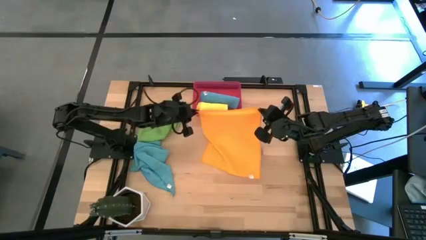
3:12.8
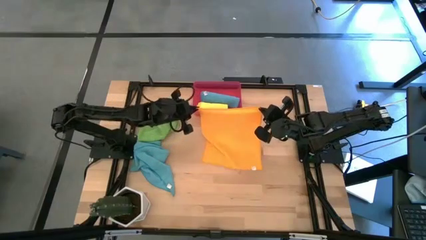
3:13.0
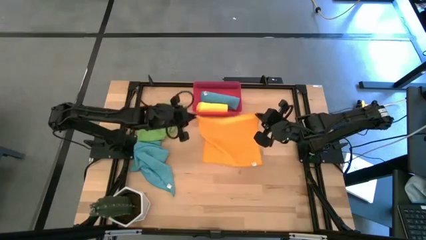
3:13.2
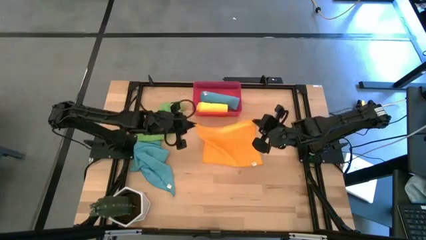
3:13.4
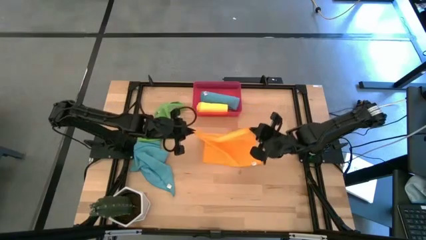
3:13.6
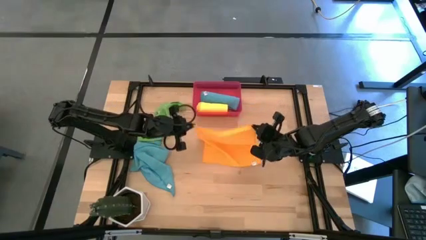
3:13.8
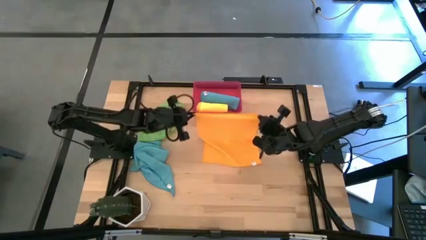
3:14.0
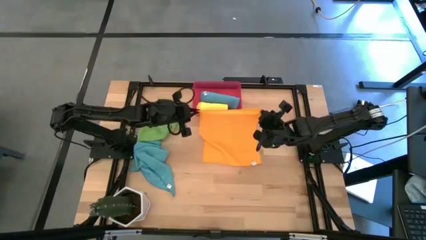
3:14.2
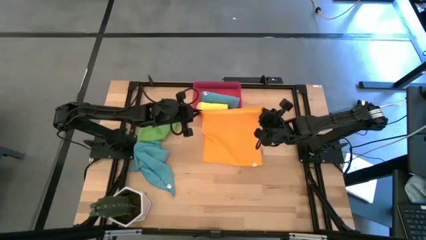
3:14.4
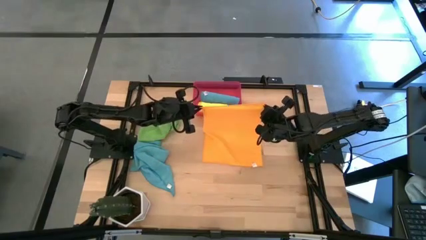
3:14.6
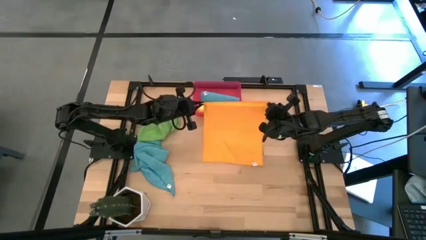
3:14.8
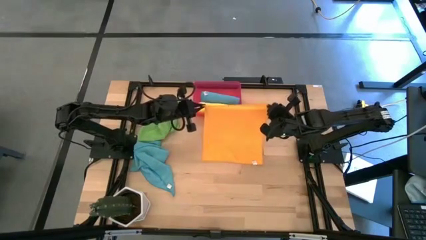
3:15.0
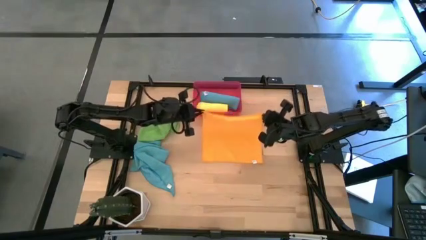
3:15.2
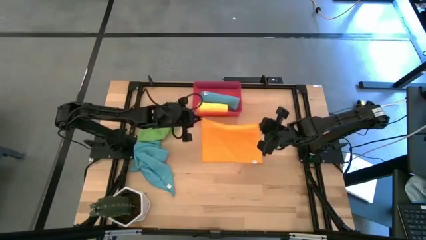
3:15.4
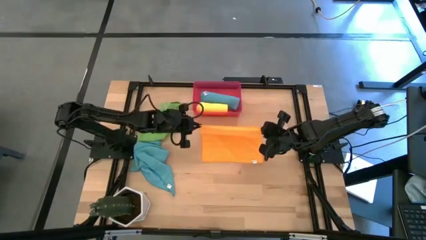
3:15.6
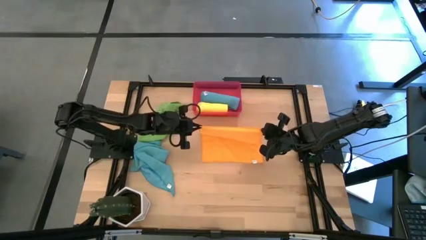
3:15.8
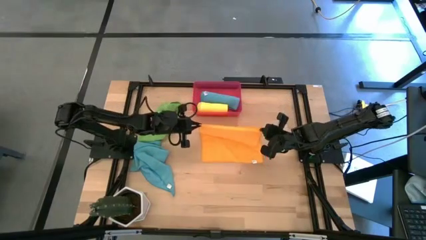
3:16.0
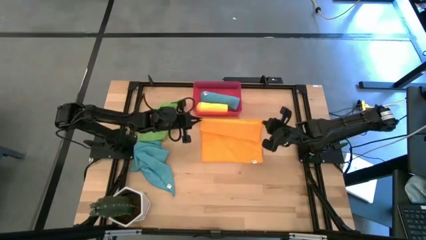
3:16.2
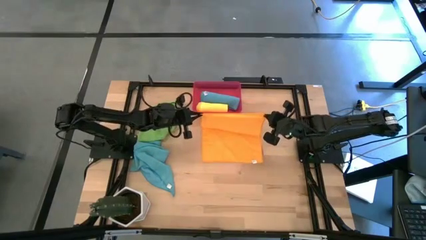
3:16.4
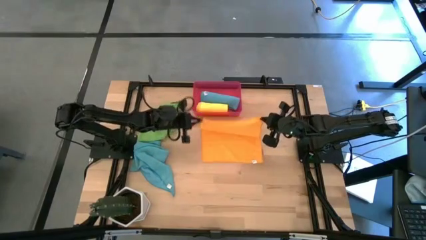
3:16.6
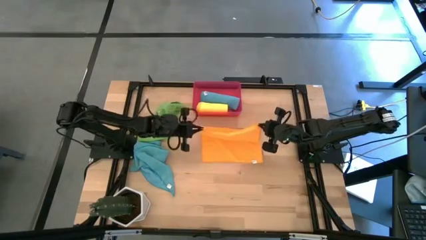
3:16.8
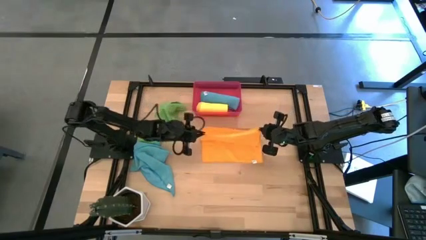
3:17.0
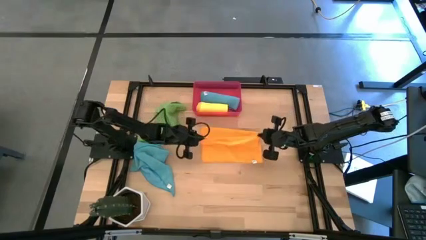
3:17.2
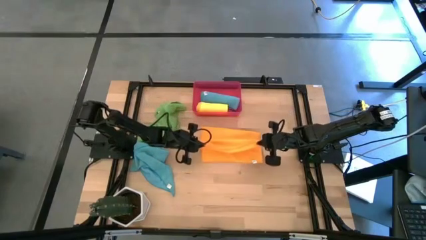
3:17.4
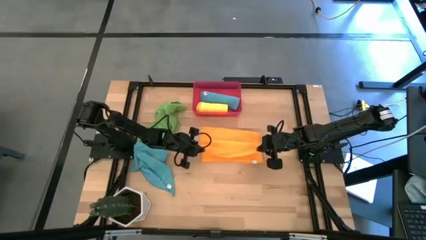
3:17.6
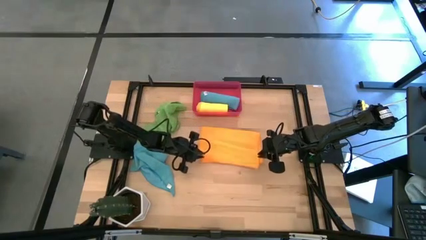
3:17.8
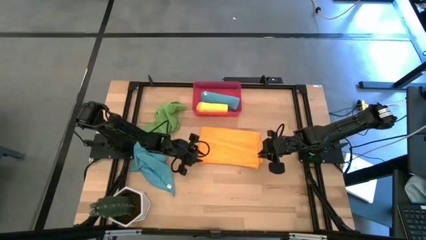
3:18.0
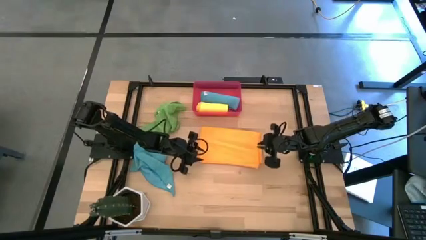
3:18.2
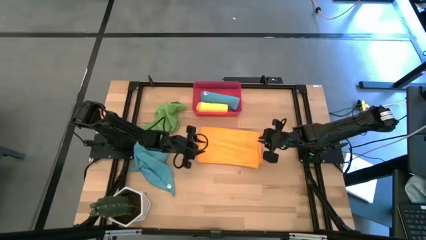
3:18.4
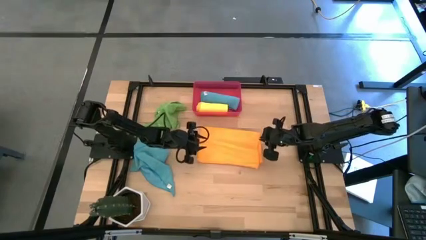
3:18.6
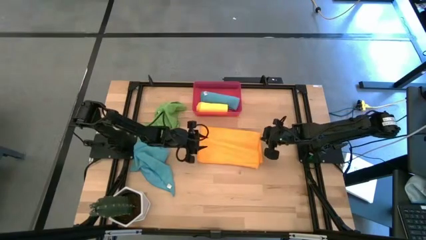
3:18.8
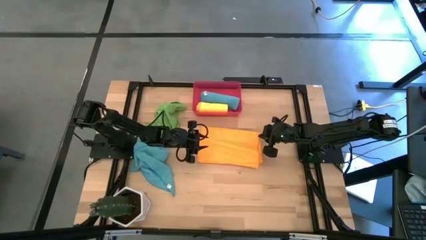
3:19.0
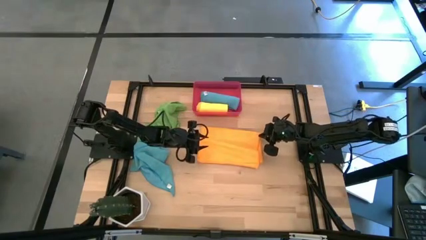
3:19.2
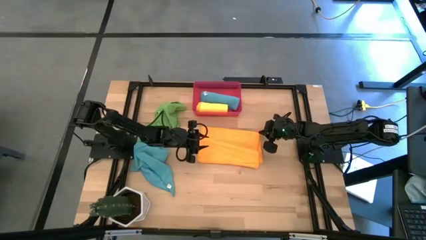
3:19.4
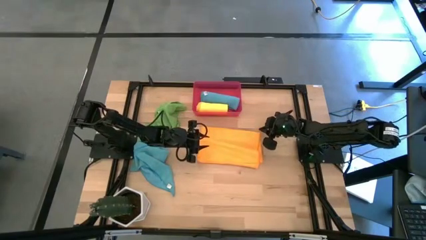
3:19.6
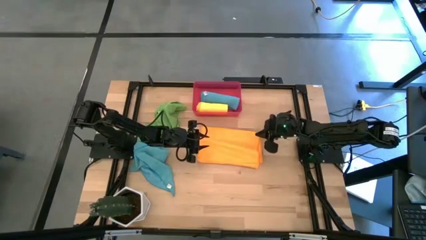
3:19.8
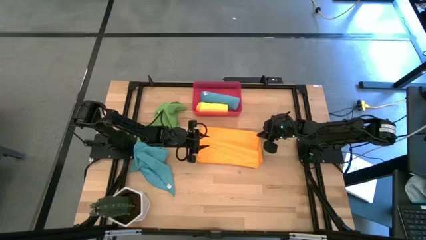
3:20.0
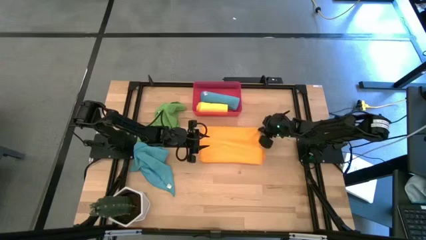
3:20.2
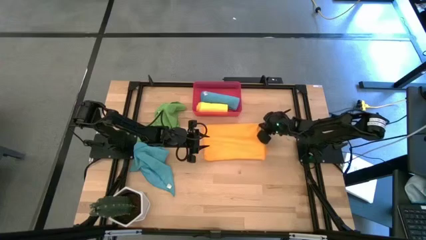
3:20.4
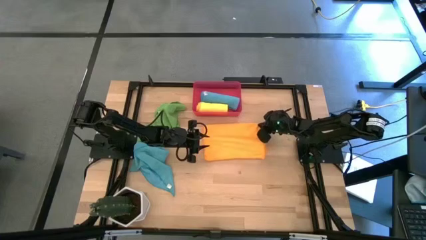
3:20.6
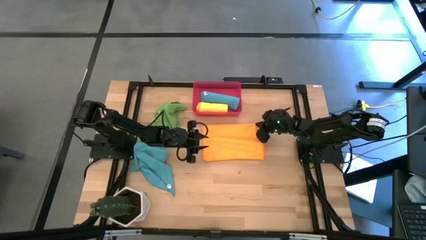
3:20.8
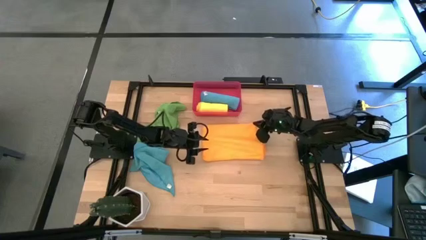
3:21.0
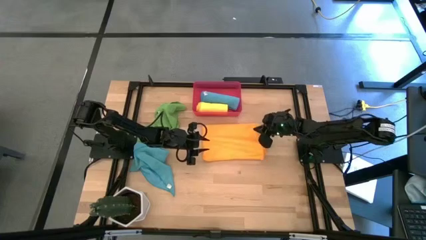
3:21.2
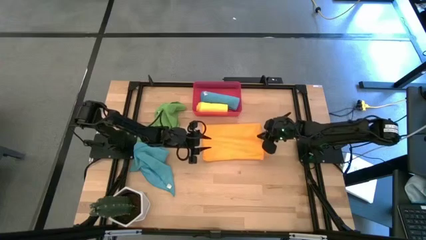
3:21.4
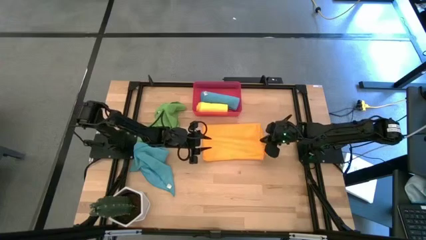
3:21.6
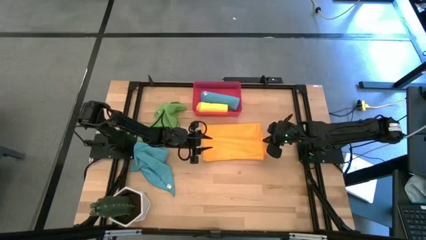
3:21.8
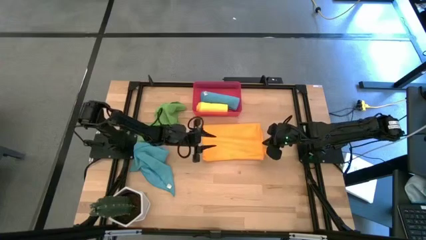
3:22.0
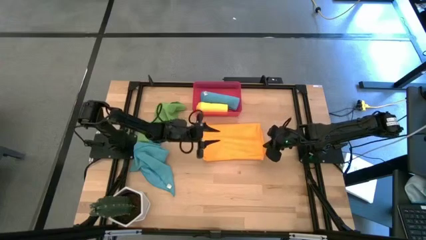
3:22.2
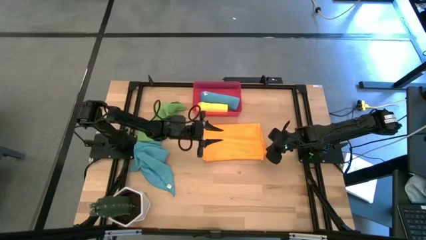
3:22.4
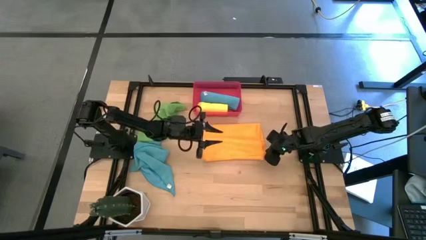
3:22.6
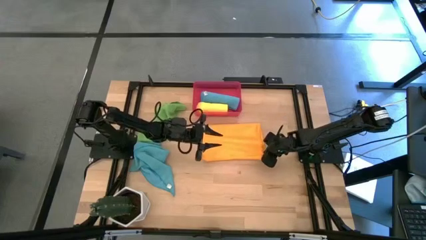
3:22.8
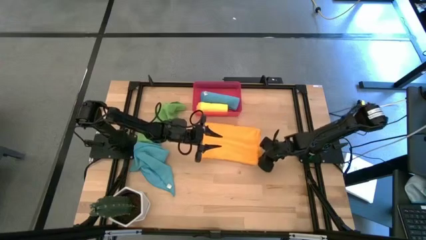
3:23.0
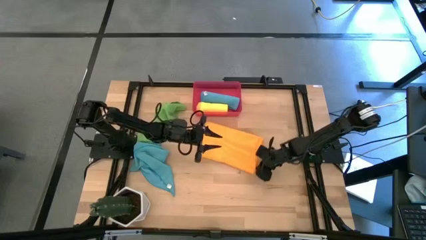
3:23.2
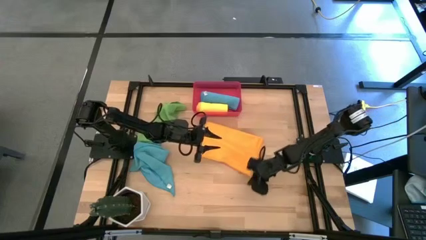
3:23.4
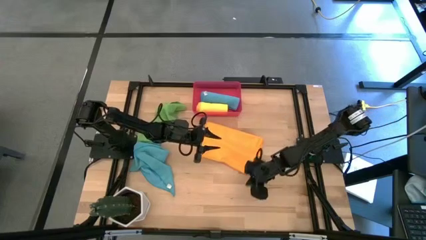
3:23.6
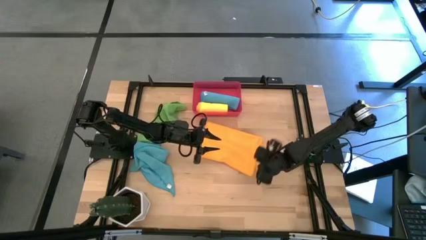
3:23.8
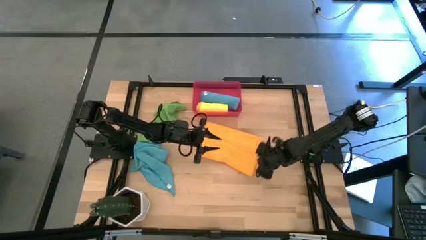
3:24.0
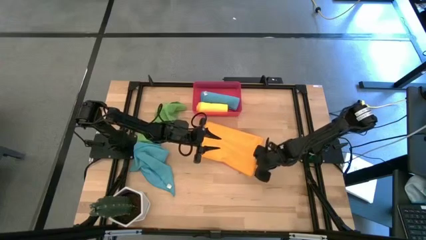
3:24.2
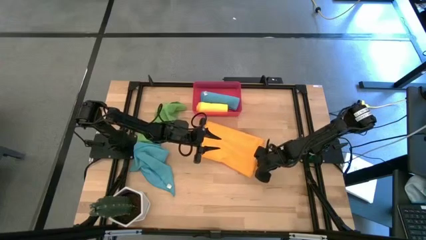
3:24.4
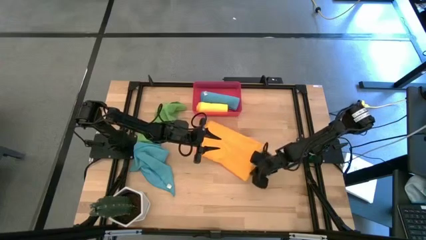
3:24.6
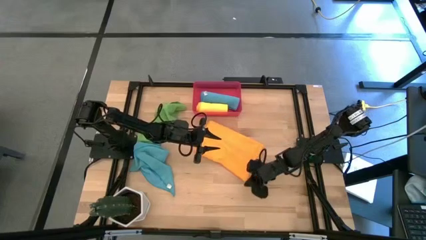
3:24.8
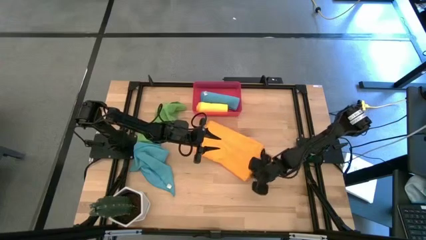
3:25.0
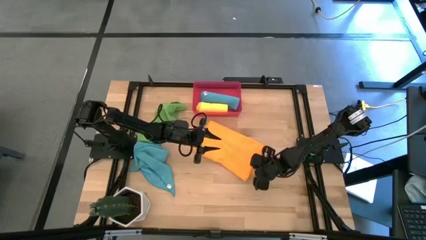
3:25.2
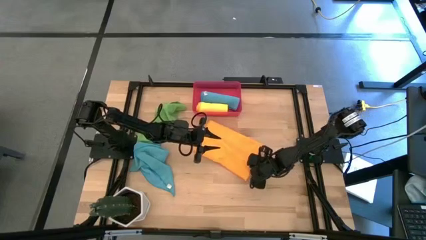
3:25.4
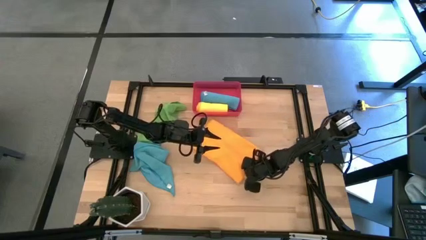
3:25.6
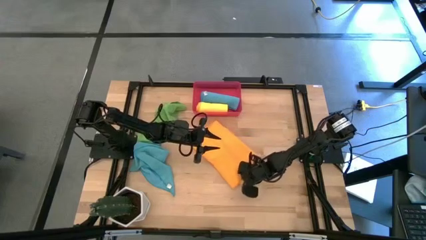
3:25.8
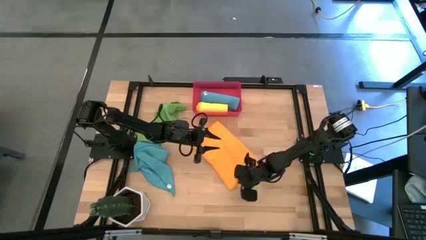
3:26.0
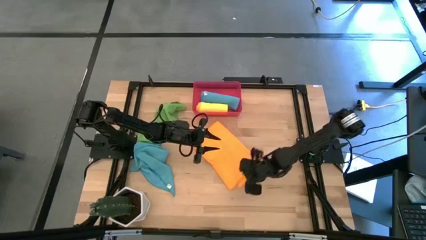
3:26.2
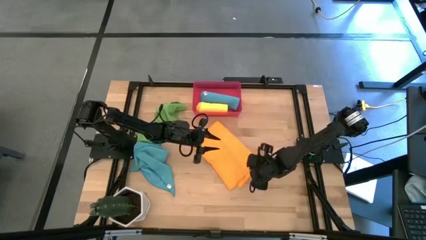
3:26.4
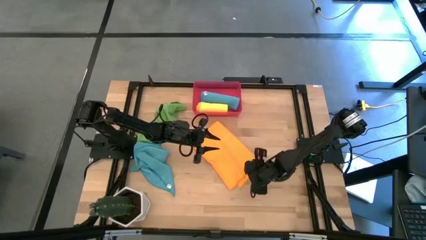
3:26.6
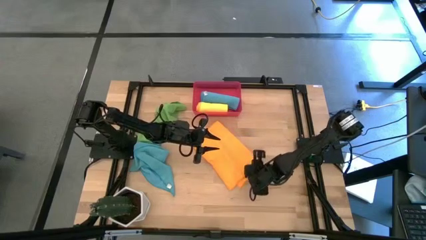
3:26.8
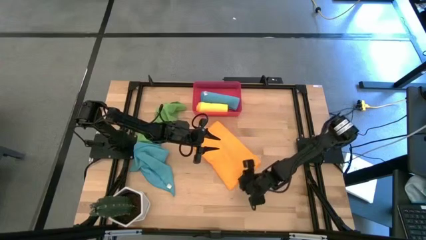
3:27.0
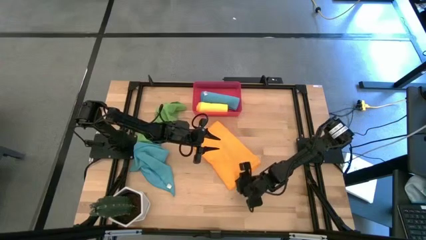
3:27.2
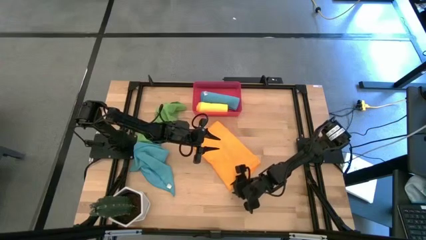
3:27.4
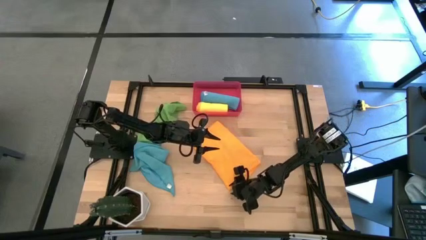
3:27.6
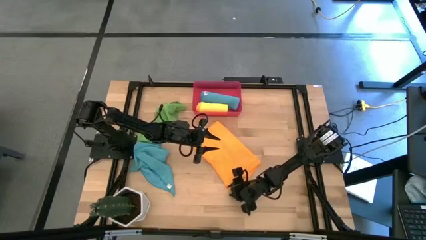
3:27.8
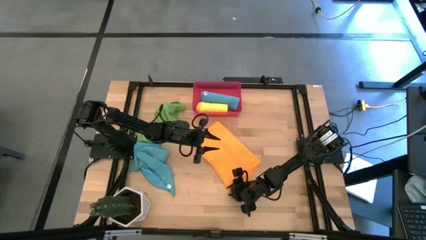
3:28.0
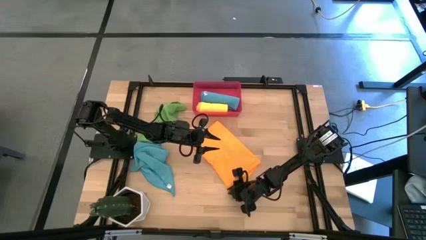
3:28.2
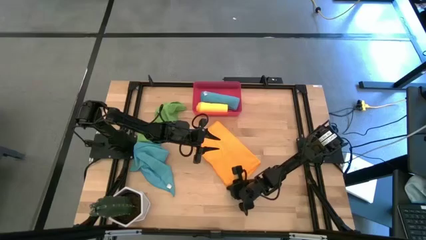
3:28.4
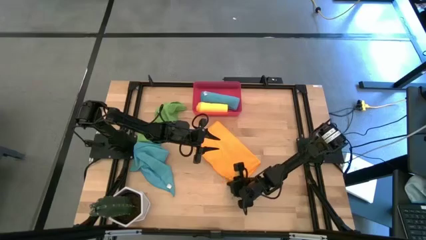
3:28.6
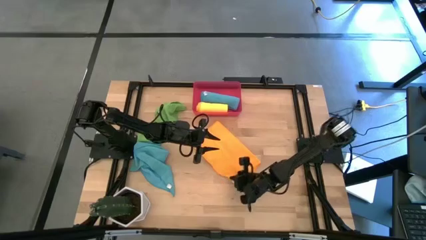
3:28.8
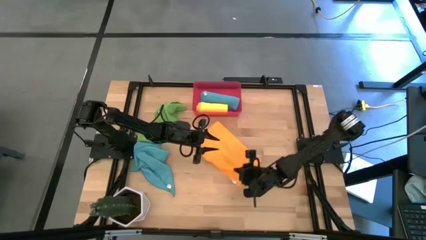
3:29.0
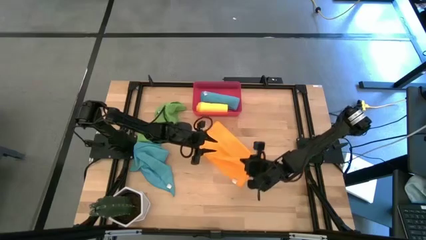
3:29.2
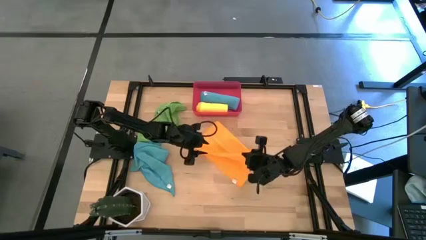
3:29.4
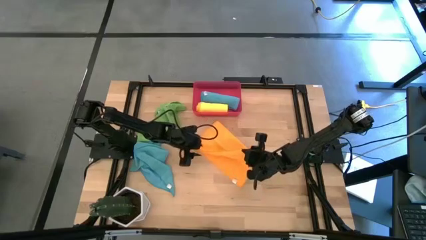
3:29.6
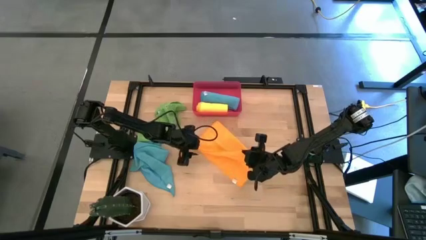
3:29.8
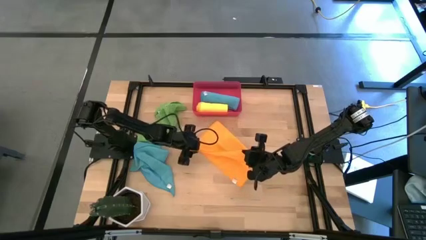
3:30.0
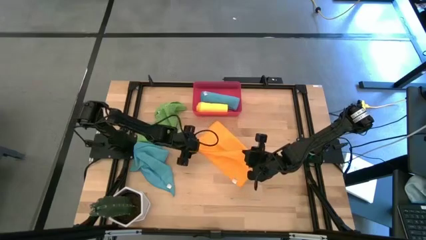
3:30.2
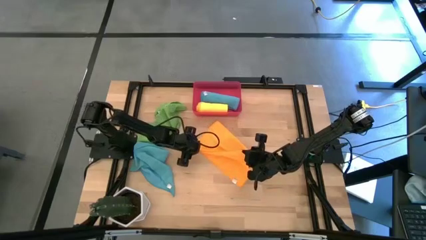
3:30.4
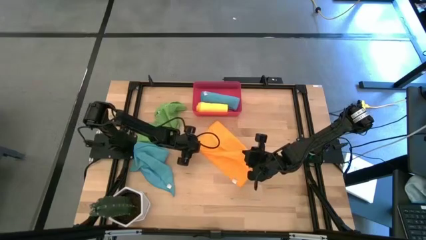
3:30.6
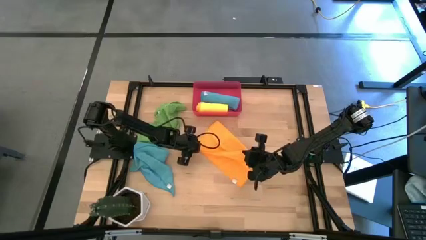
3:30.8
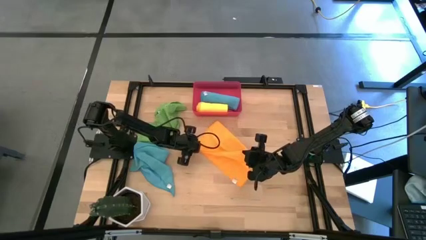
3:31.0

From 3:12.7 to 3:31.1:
Task: Roll microfiber towels into tight, uniform cylinder then place into a basket
Roll the orange microfiber cloth
